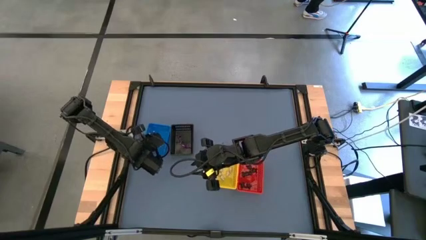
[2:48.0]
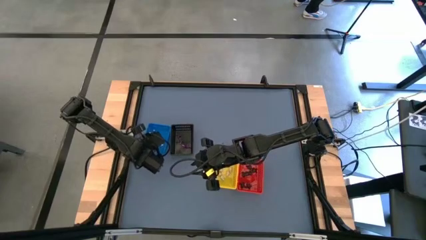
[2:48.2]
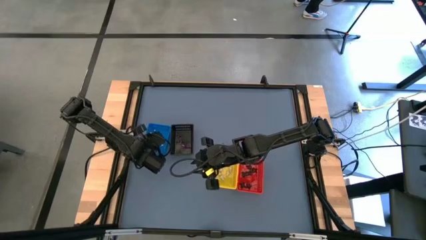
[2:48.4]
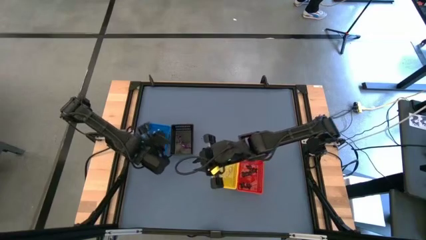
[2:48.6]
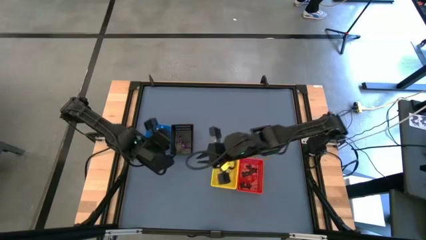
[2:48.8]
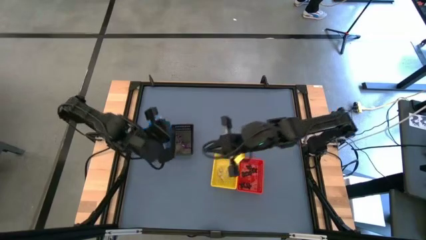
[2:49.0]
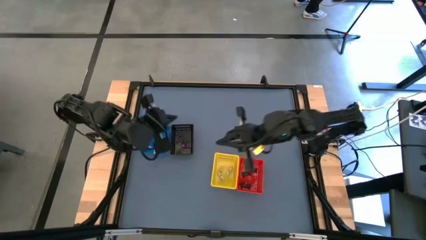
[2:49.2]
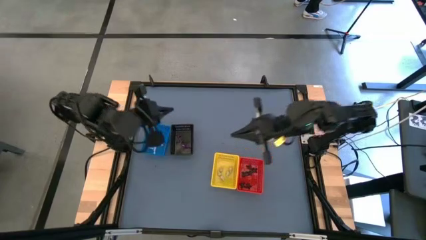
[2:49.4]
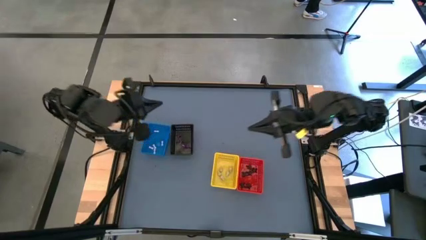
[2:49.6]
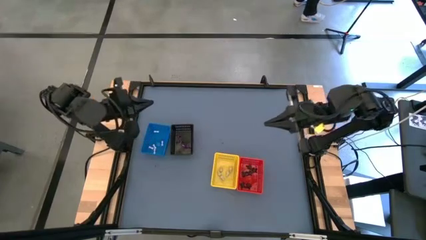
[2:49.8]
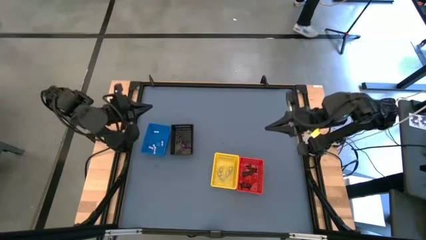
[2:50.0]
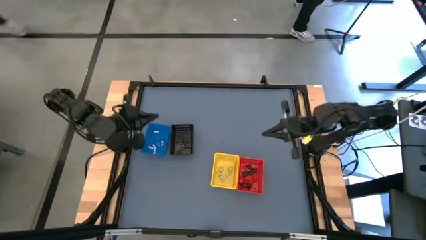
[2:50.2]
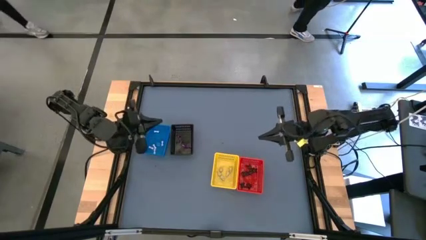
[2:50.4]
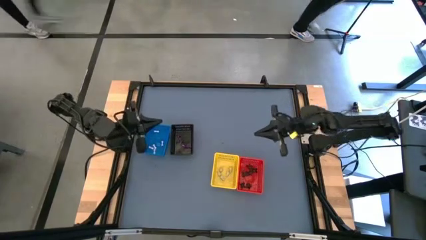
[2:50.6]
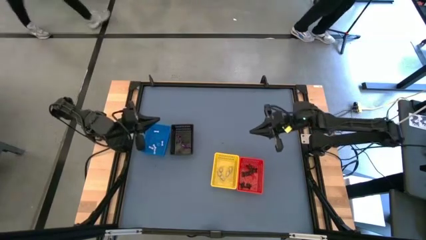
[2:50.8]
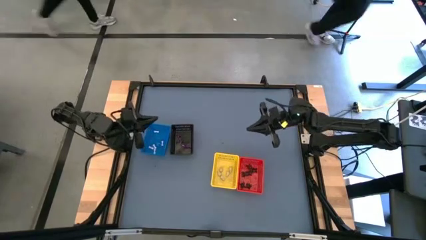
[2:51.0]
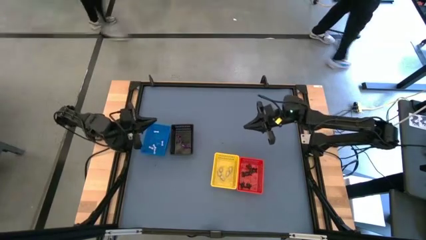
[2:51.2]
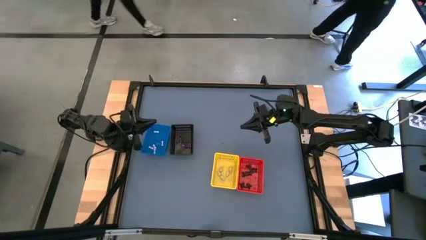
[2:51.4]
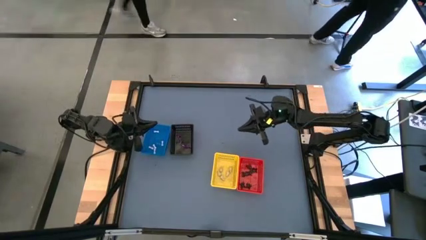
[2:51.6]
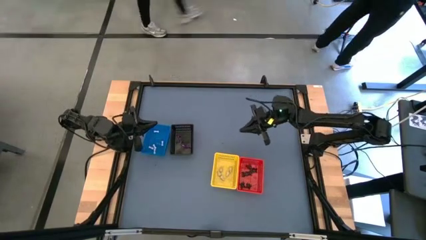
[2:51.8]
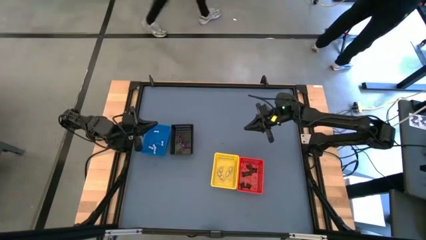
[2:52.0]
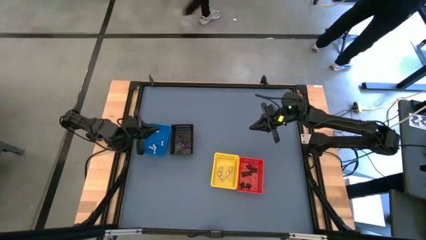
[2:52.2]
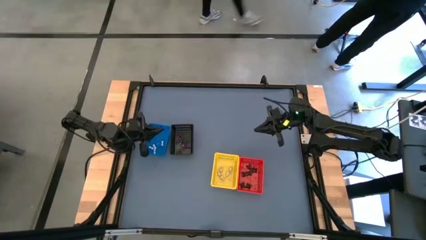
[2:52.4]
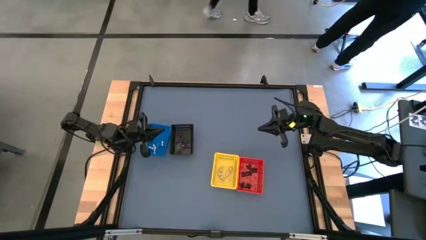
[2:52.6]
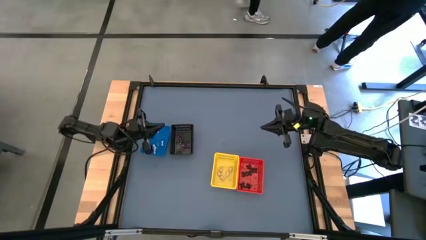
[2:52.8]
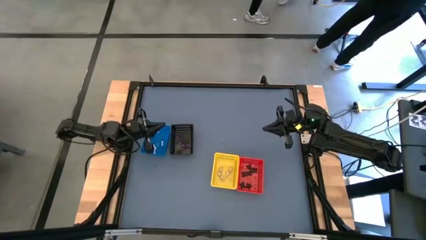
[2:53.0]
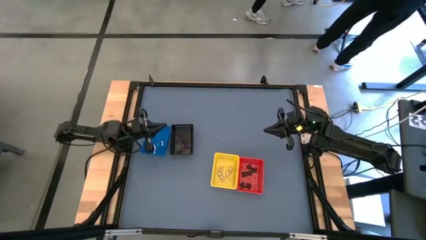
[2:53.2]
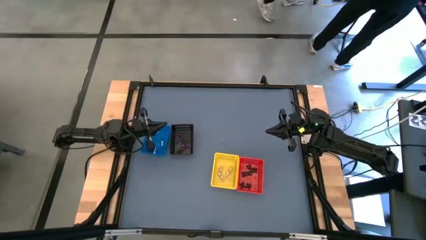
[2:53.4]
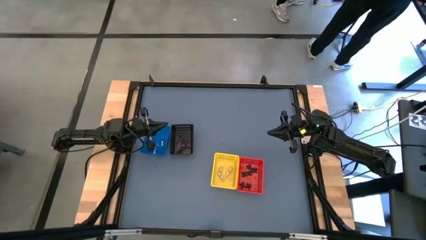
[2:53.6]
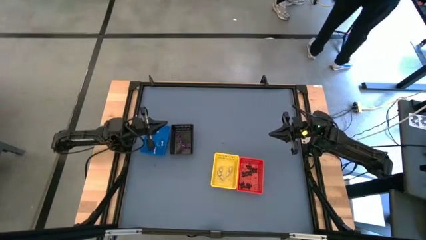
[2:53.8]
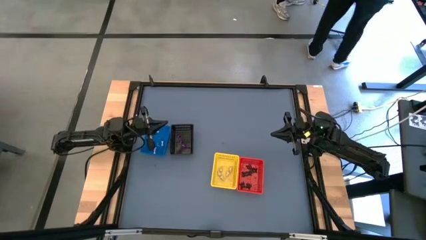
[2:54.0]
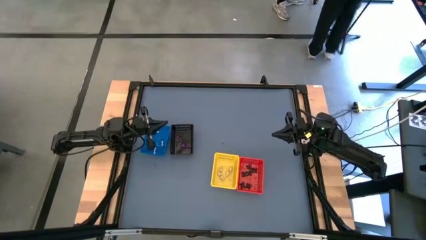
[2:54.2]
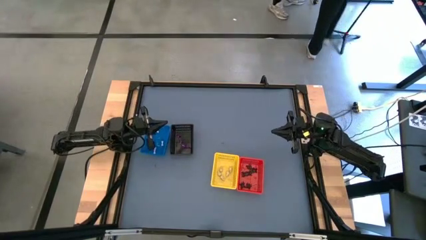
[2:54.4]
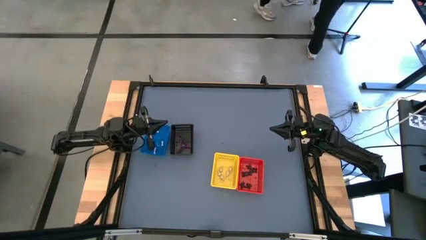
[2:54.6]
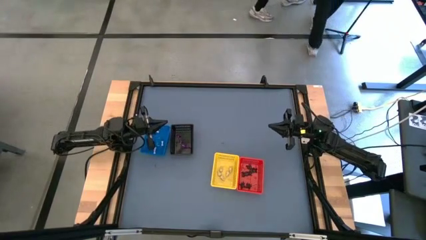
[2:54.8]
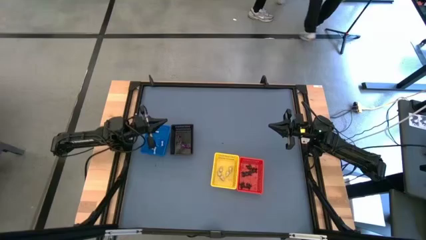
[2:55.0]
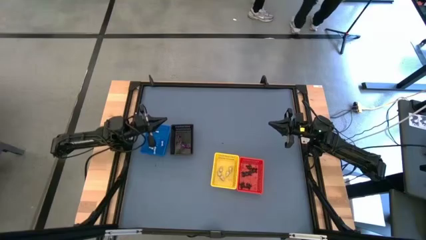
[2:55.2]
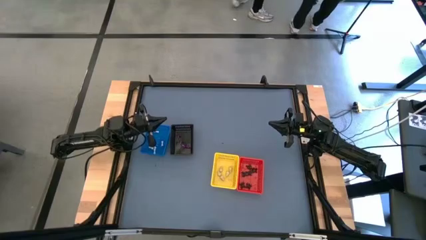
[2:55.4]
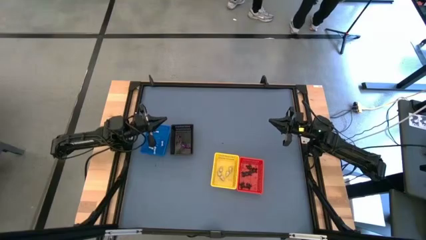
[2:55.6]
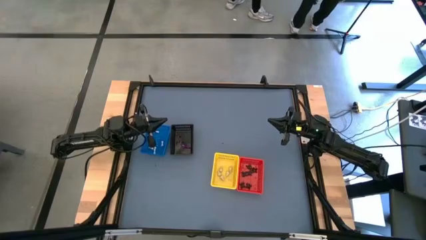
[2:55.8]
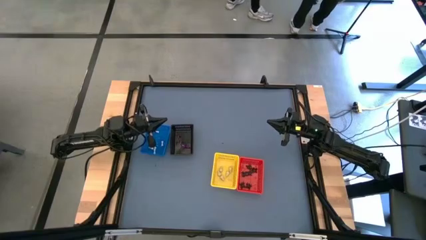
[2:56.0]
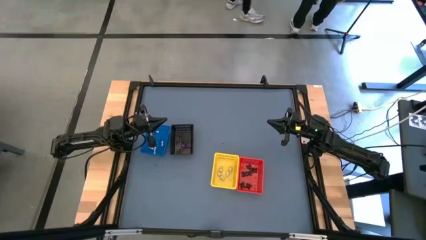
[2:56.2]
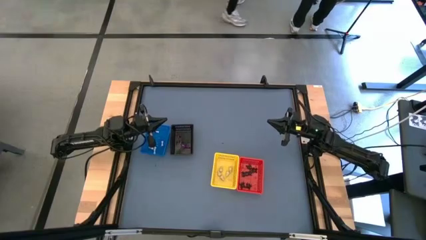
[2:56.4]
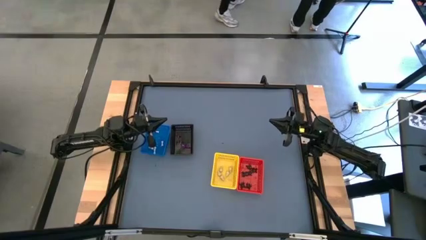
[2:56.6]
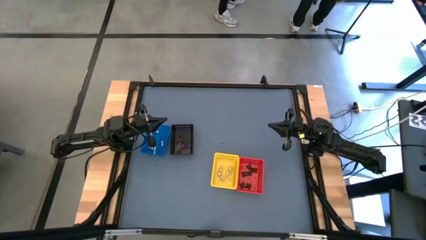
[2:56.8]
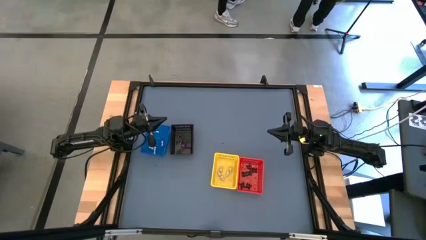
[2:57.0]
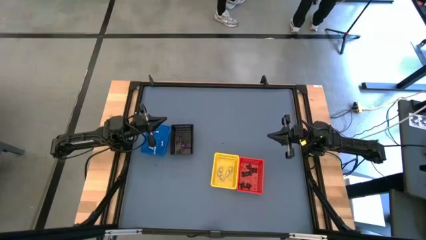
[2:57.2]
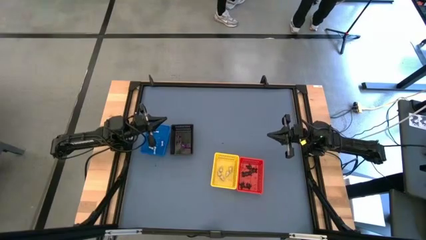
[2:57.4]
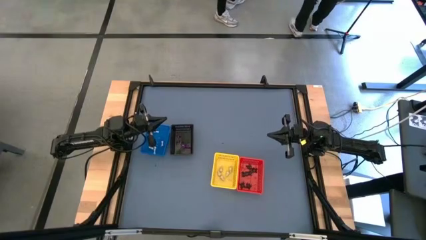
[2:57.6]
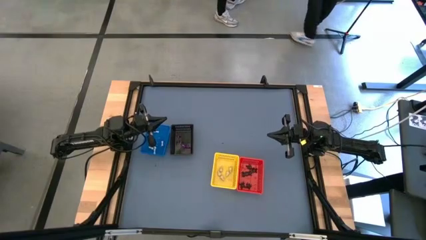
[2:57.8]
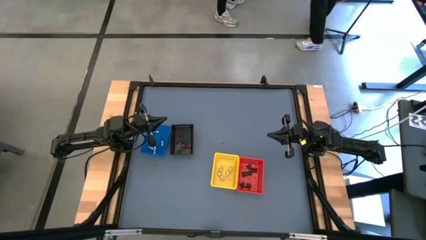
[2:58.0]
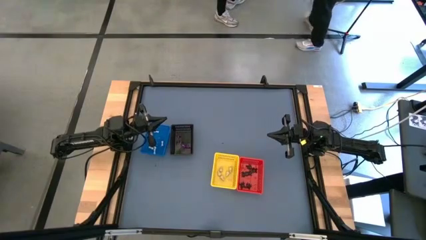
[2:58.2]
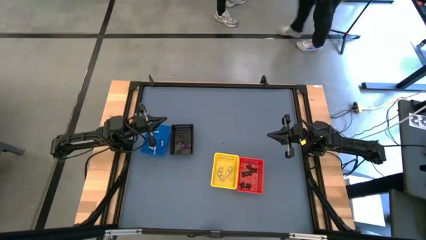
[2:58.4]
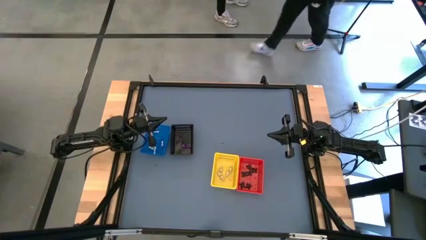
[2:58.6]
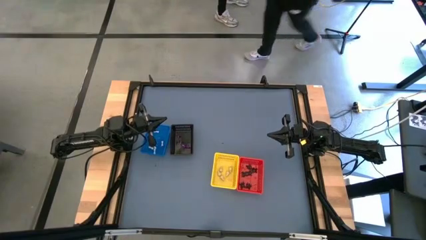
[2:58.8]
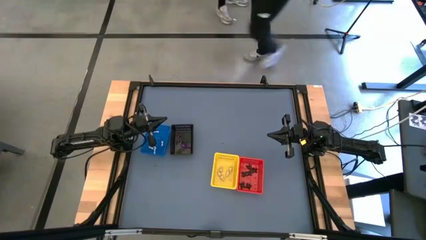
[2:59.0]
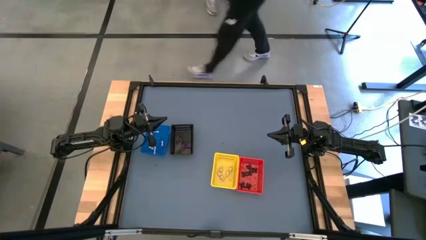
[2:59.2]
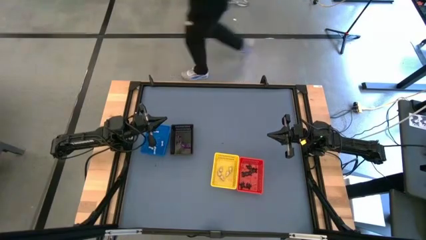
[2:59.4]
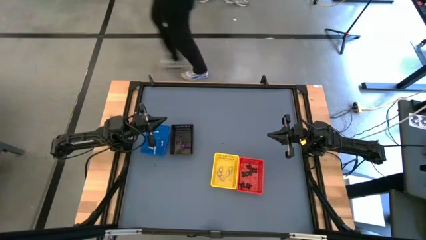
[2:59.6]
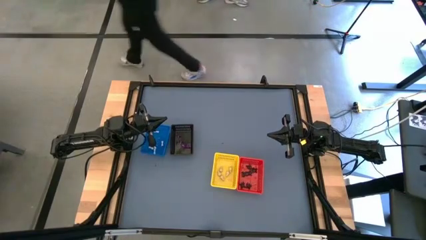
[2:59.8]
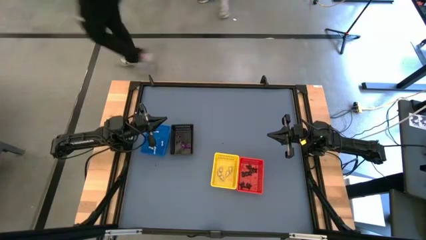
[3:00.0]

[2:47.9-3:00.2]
Task: Sort Halloween decoration
Return to Home Position
